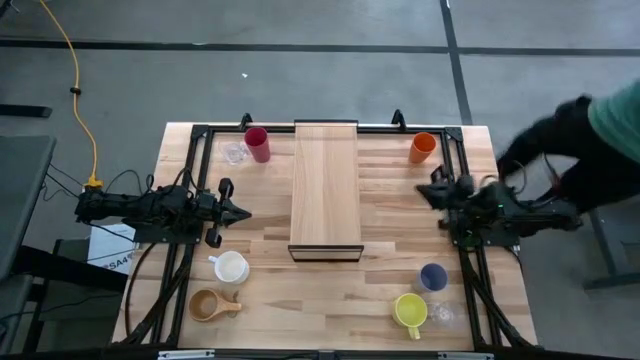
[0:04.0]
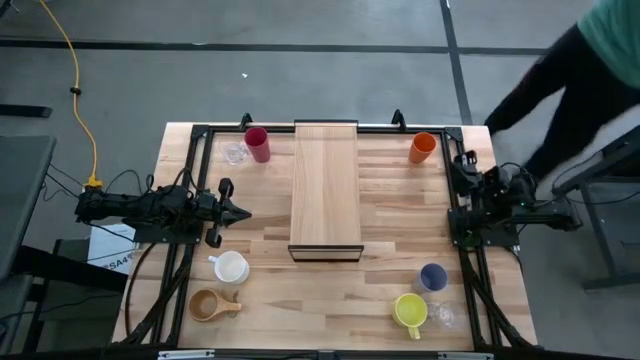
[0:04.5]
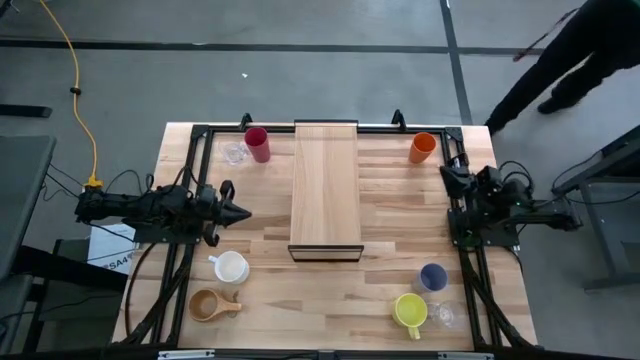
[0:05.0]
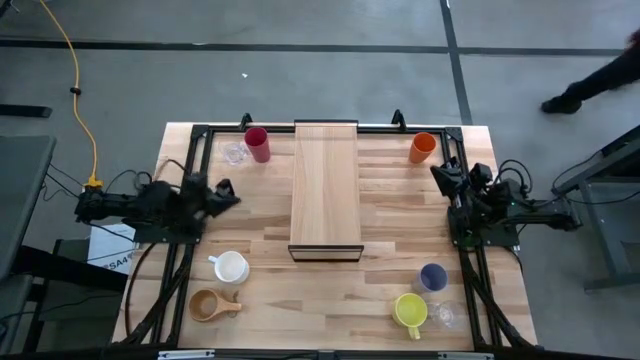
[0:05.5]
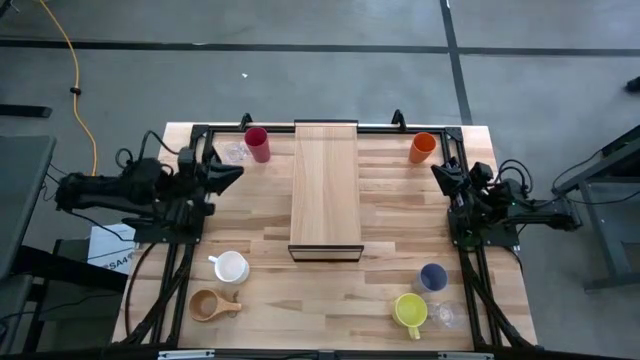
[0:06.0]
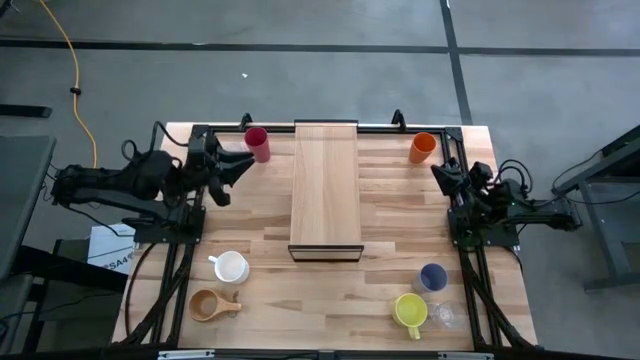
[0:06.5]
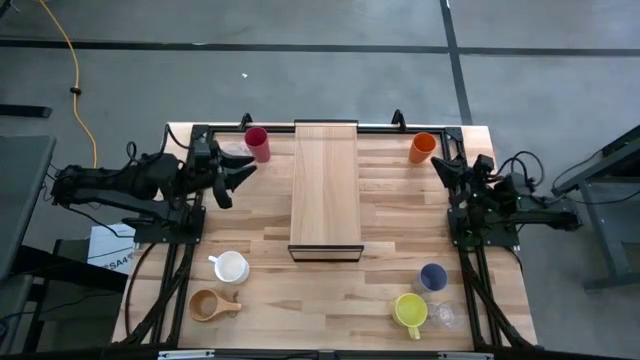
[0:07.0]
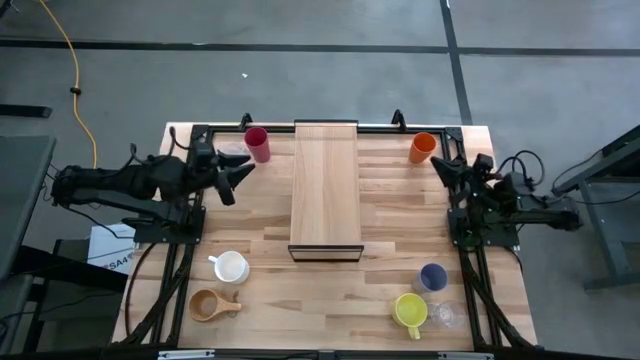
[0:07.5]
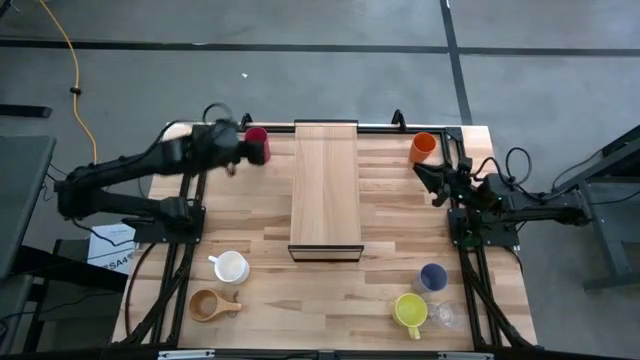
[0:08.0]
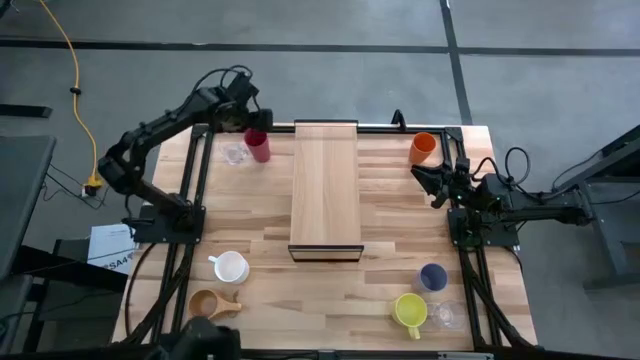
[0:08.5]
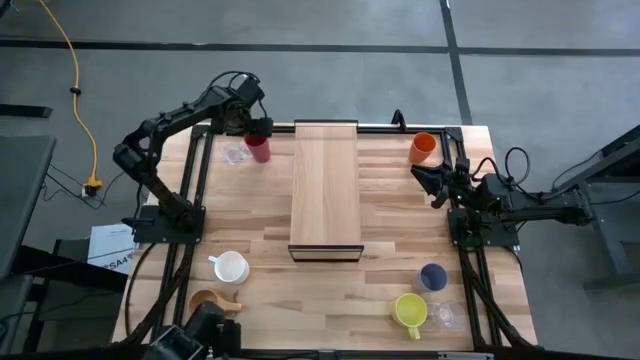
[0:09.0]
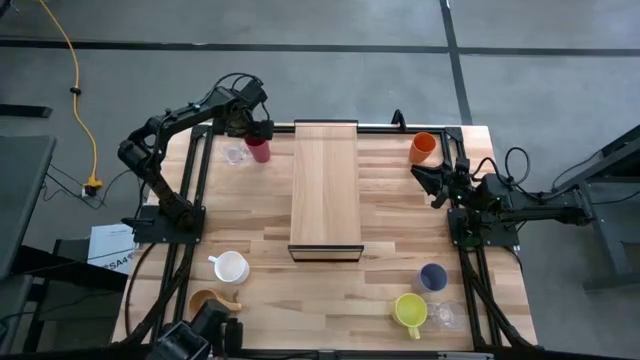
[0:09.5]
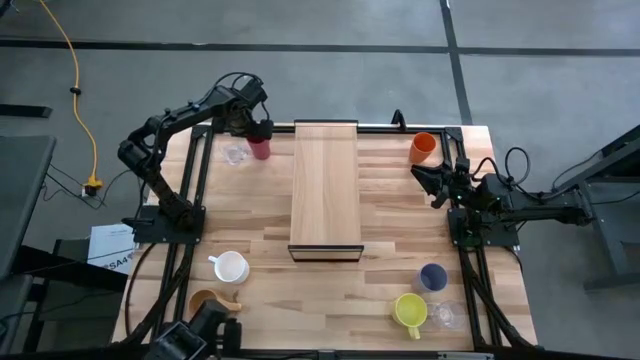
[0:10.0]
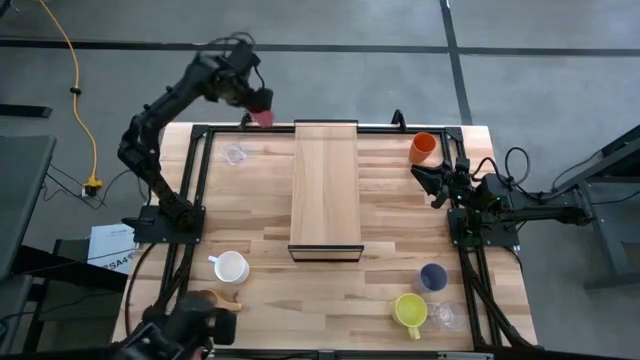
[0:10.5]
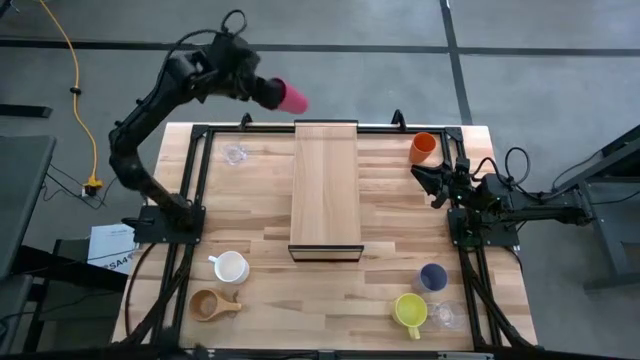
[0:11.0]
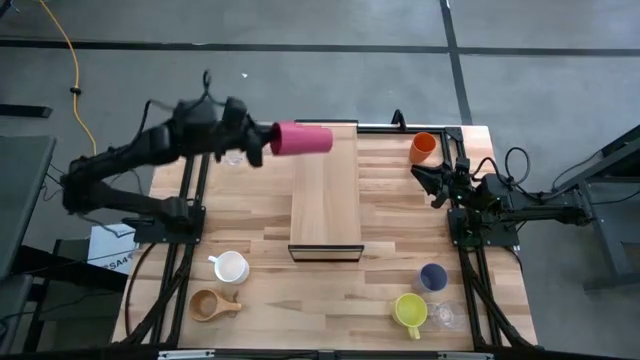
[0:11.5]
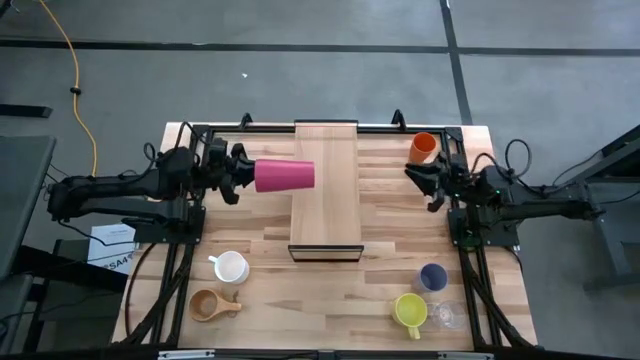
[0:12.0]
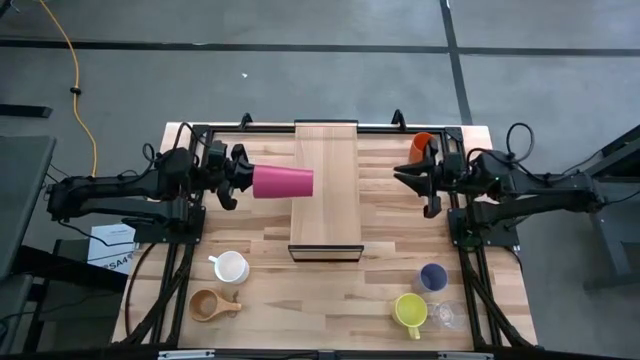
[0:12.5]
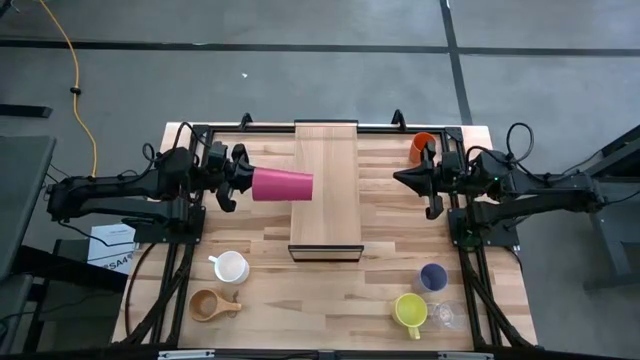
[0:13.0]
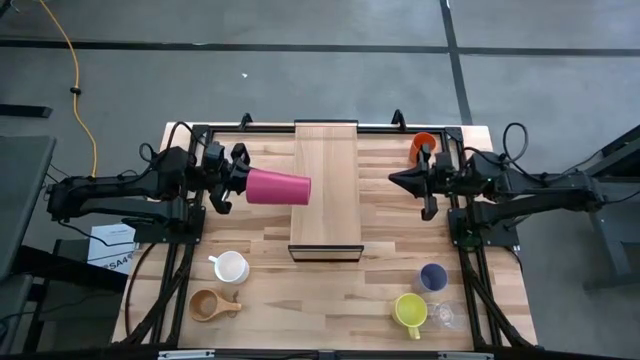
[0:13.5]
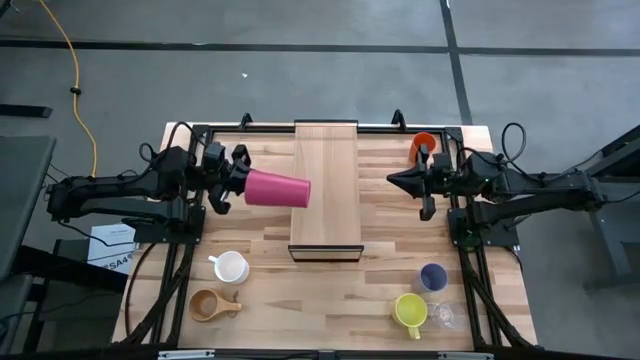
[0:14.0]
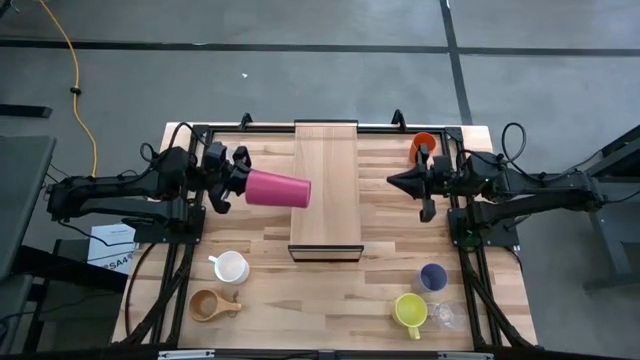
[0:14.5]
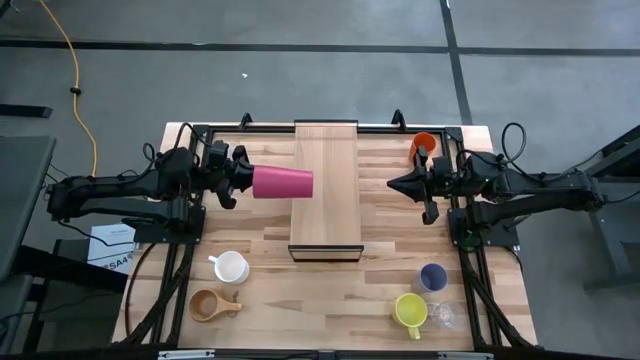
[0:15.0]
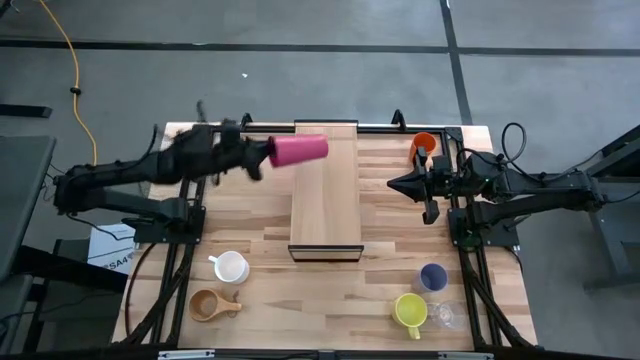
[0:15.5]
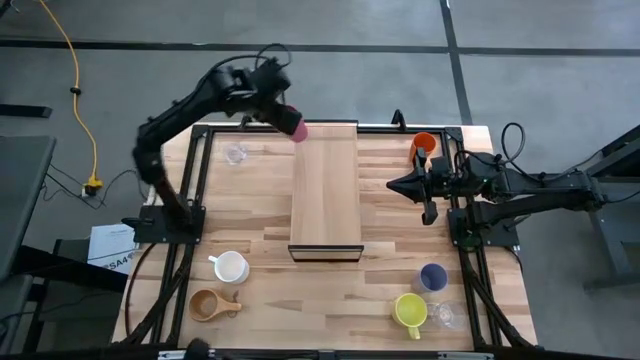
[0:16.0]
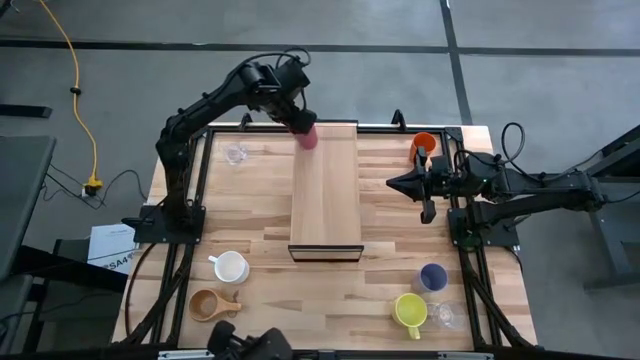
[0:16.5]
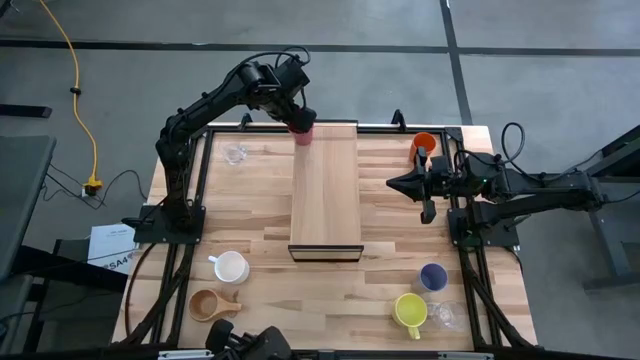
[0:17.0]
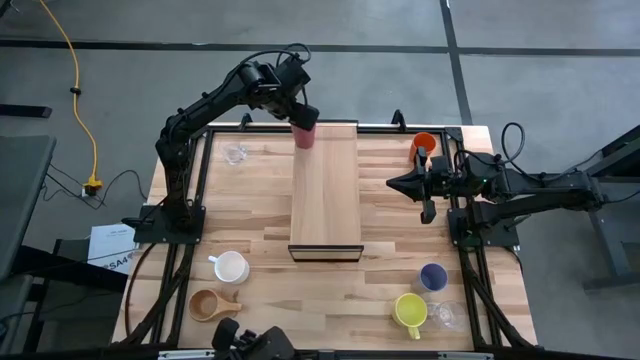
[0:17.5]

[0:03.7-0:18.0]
Task: Stack small to large cups/mugs on shelf
Put the pink cup on the shelf

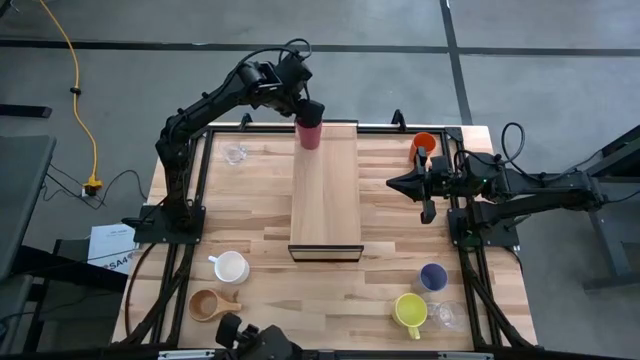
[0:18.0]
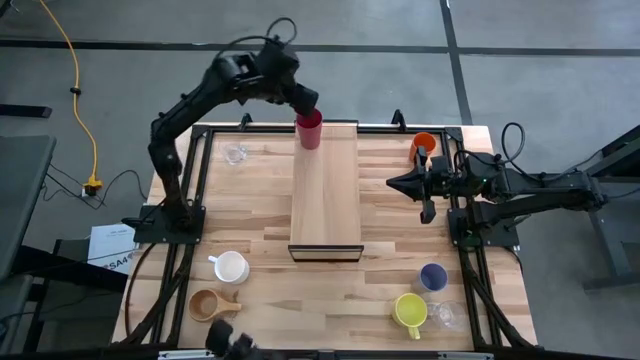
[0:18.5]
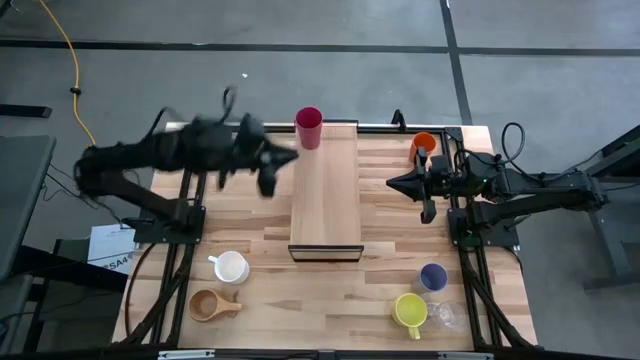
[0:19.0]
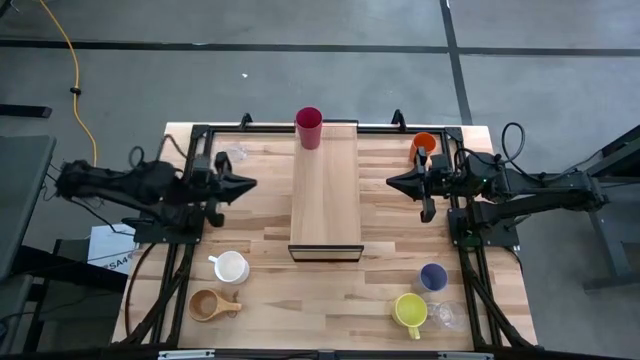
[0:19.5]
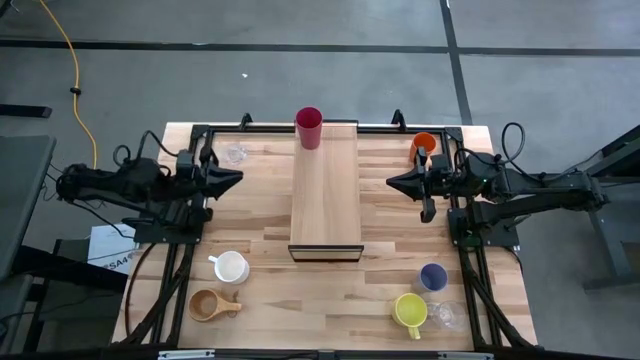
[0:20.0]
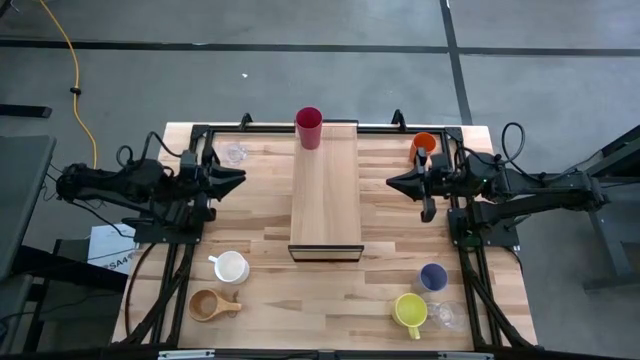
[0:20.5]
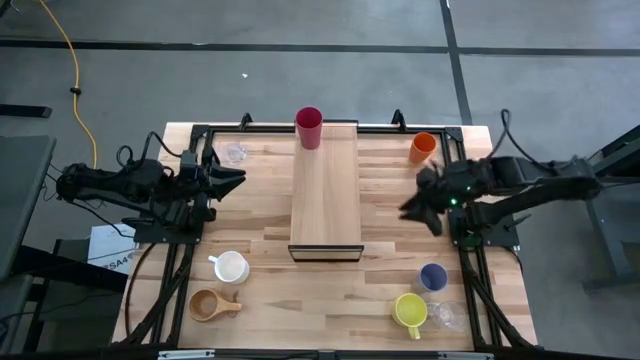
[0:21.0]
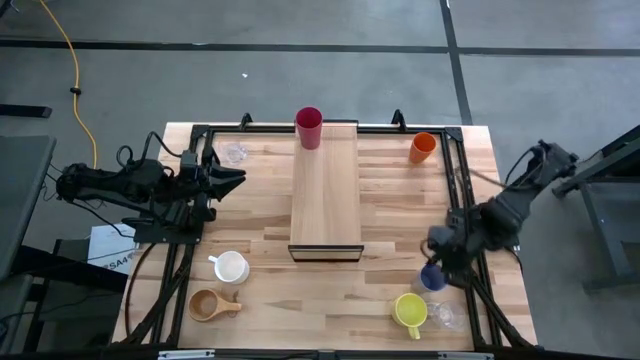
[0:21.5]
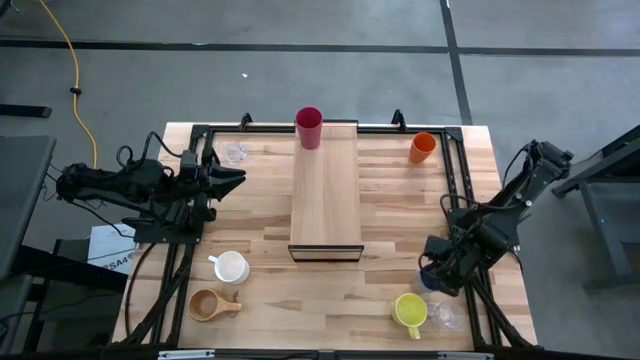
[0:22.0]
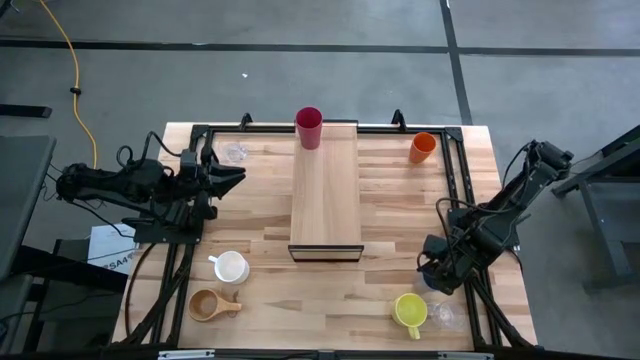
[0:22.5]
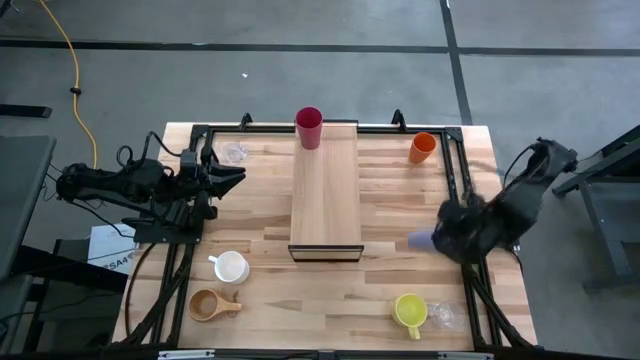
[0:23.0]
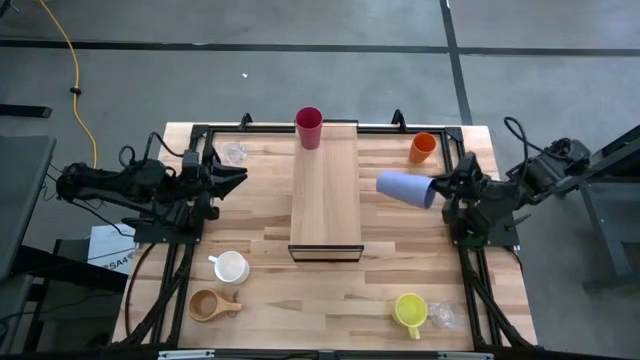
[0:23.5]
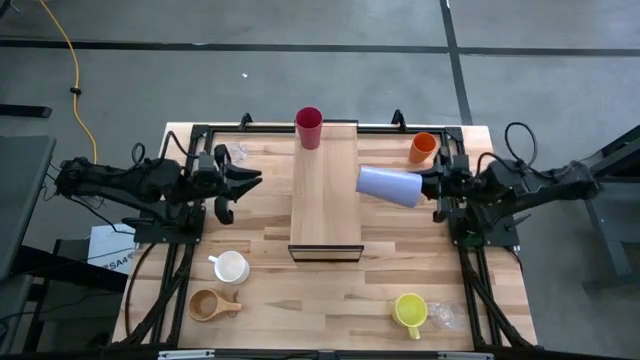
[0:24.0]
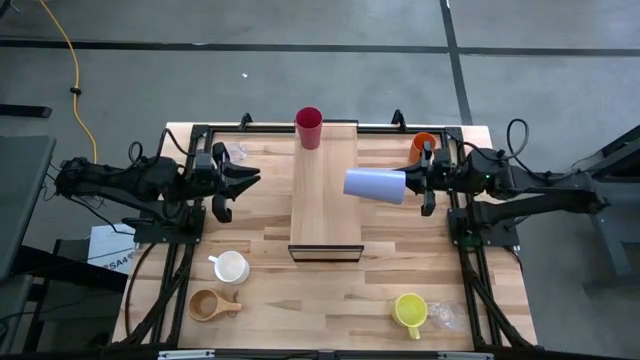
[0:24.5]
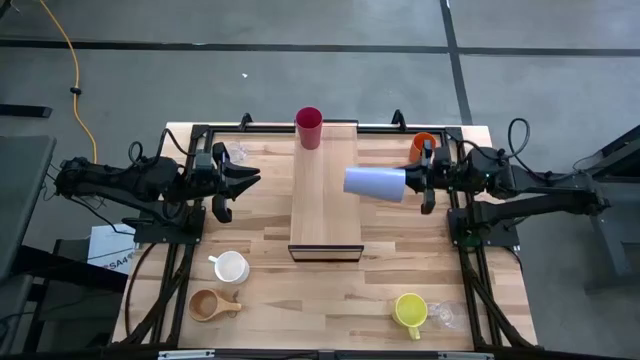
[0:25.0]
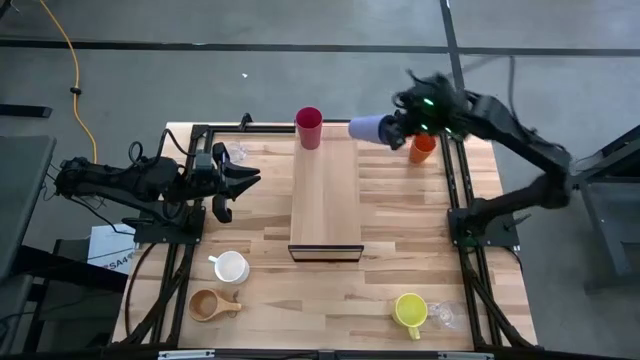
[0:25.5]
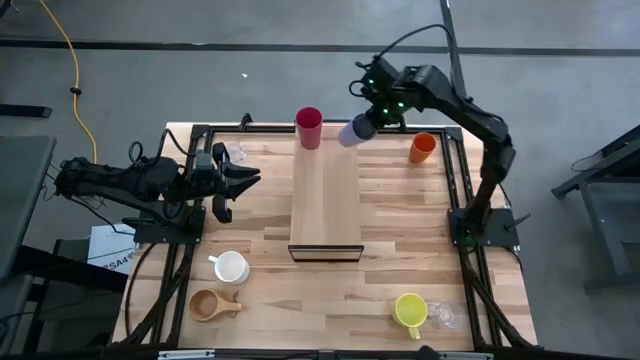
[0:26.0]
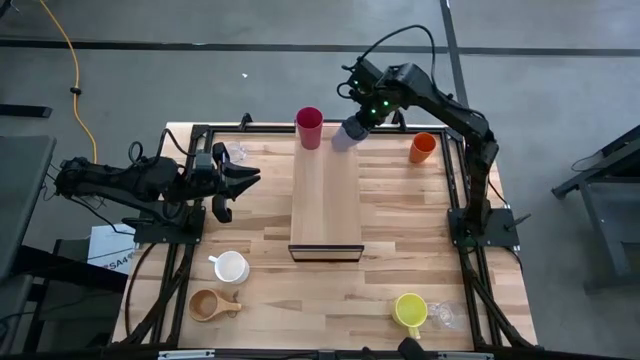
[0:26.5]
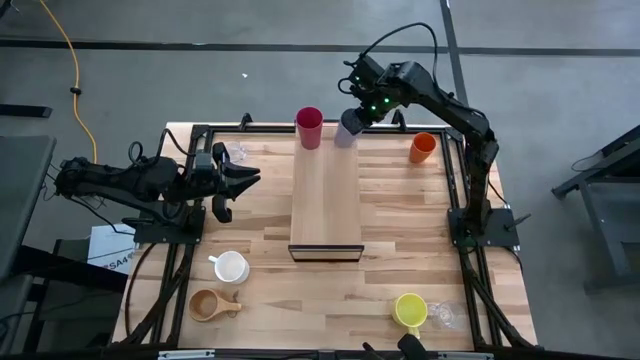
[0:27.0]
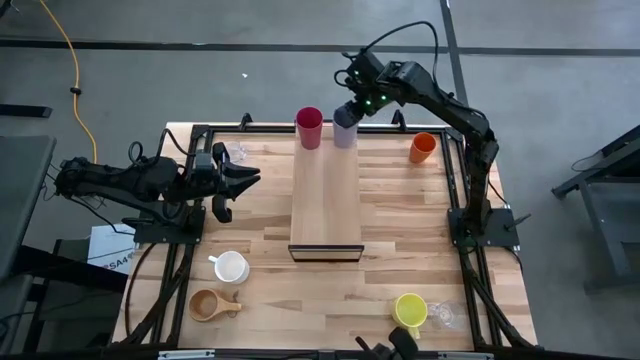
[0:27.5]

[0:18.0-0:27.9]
Put the violet cup on the shelf
